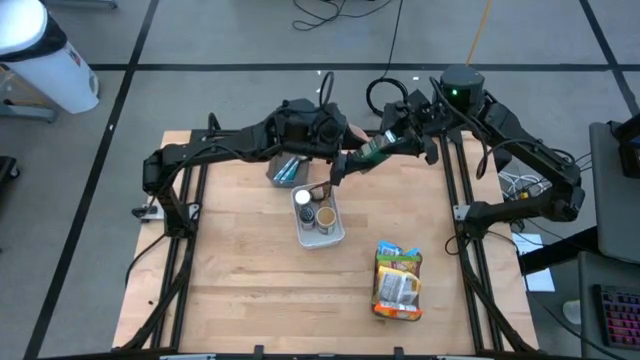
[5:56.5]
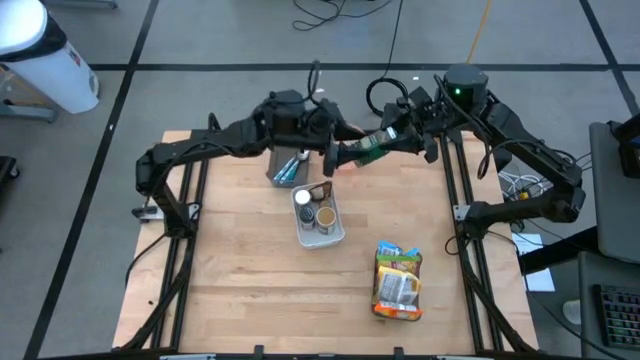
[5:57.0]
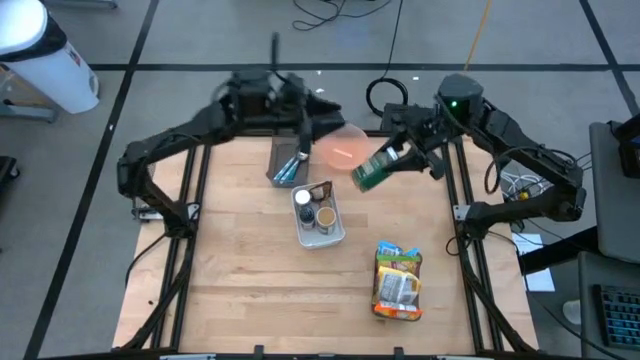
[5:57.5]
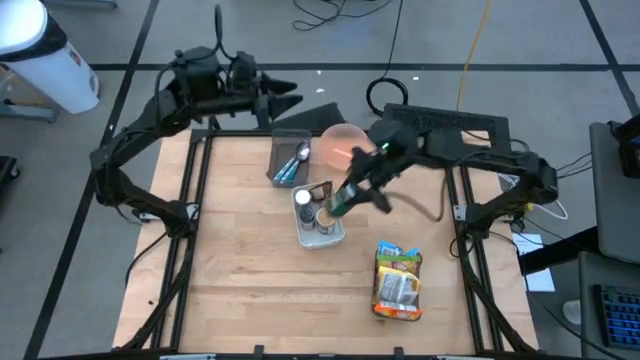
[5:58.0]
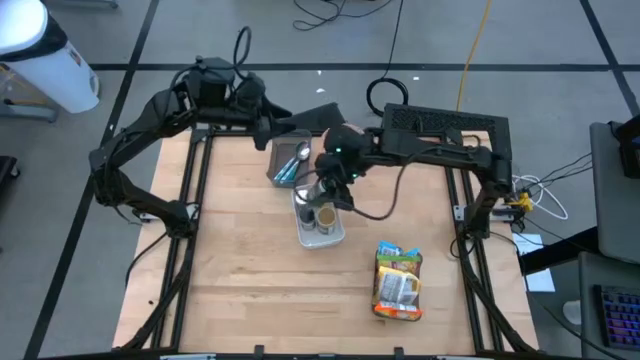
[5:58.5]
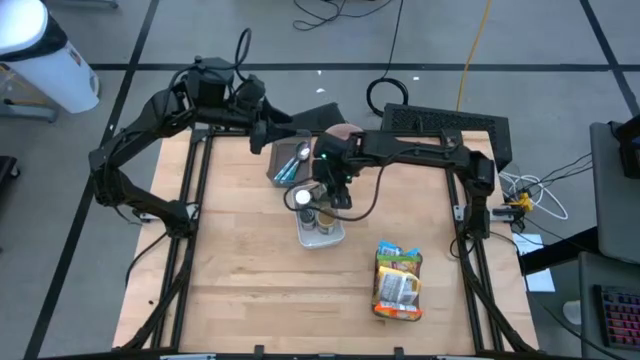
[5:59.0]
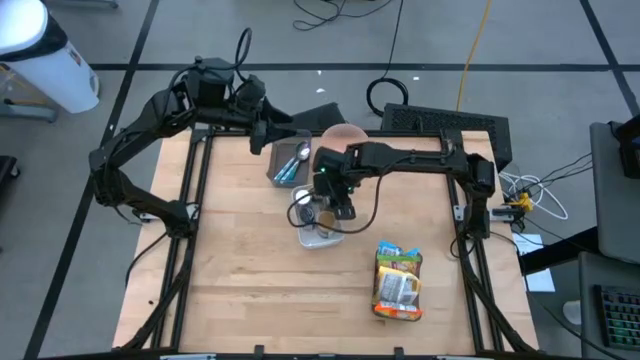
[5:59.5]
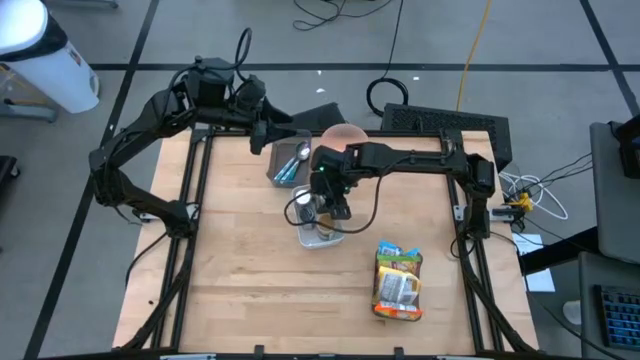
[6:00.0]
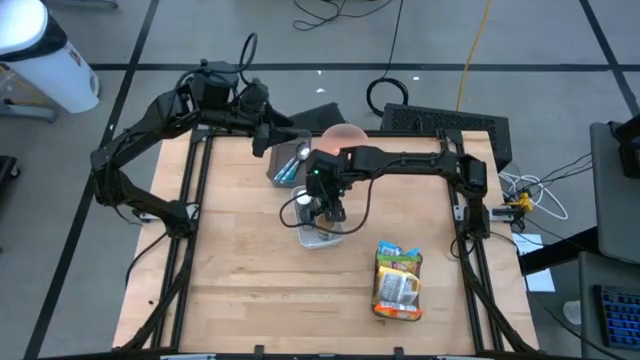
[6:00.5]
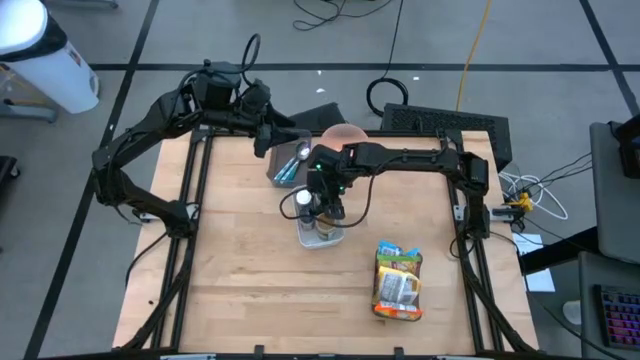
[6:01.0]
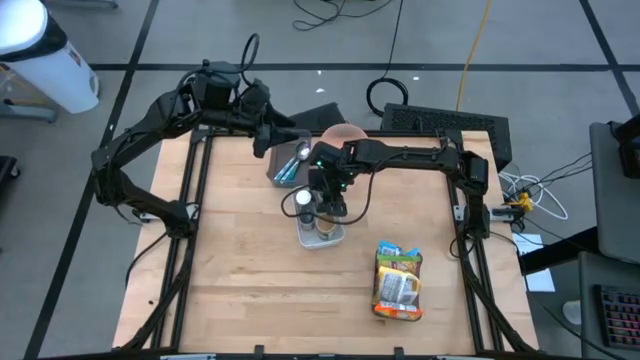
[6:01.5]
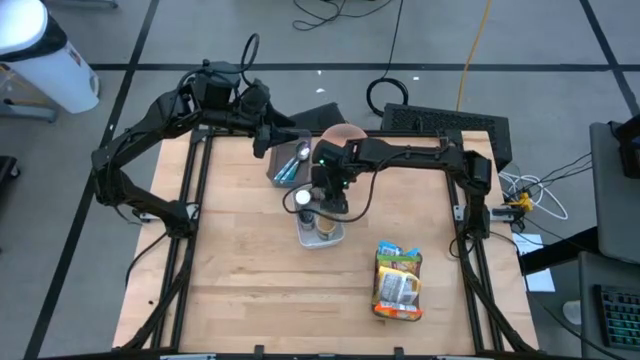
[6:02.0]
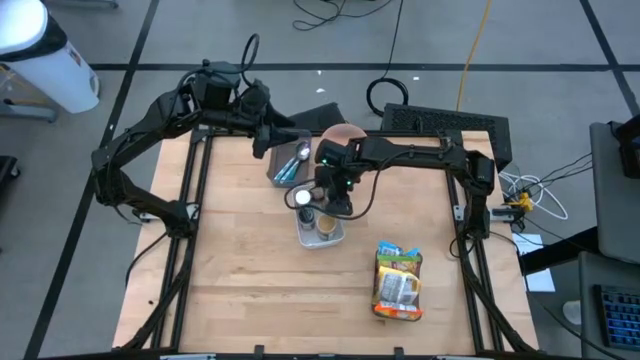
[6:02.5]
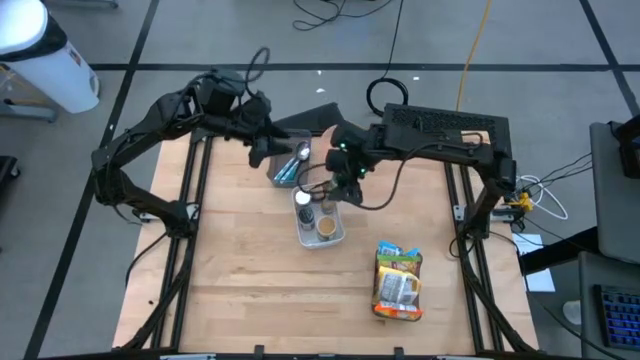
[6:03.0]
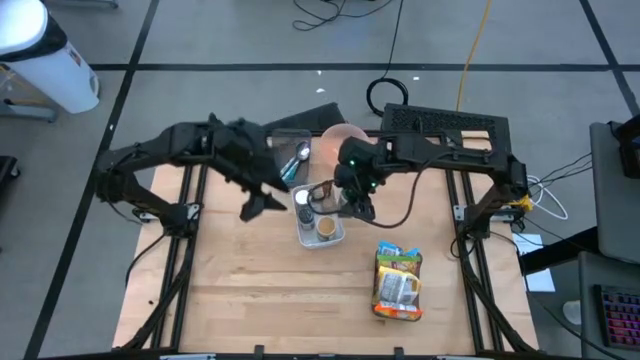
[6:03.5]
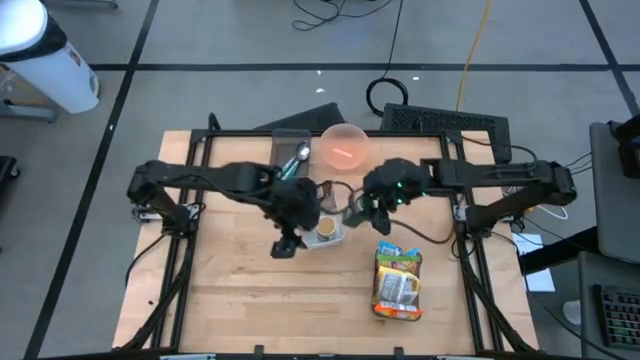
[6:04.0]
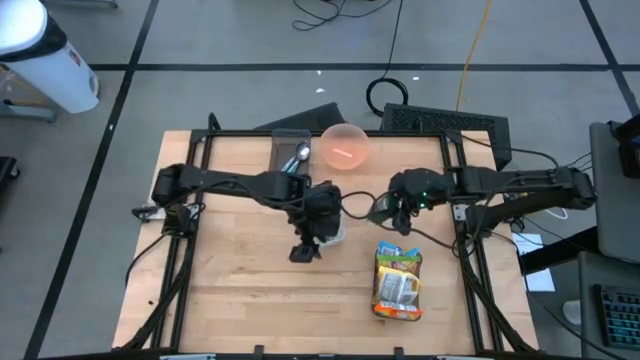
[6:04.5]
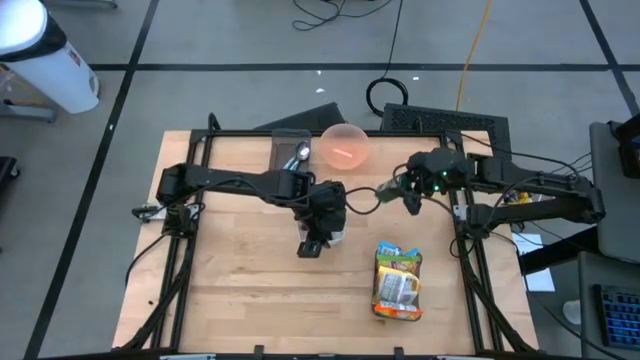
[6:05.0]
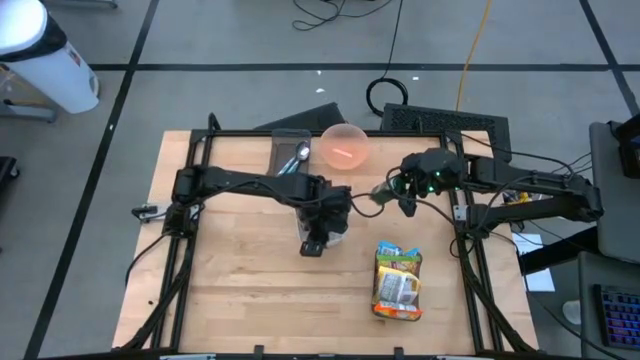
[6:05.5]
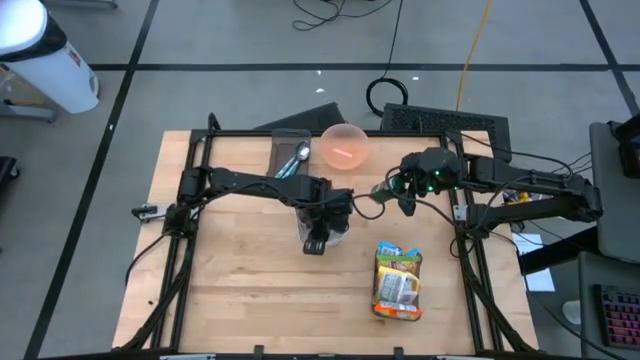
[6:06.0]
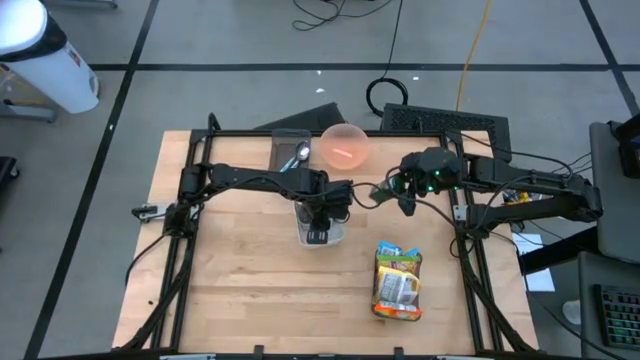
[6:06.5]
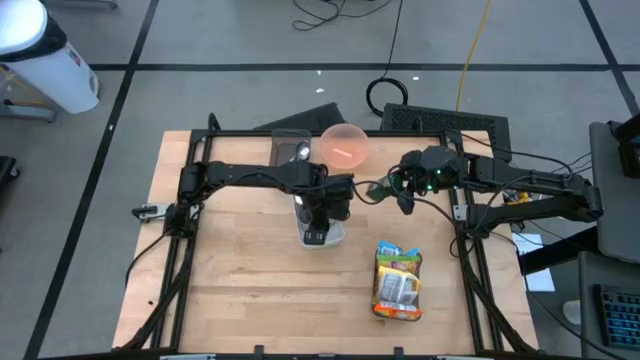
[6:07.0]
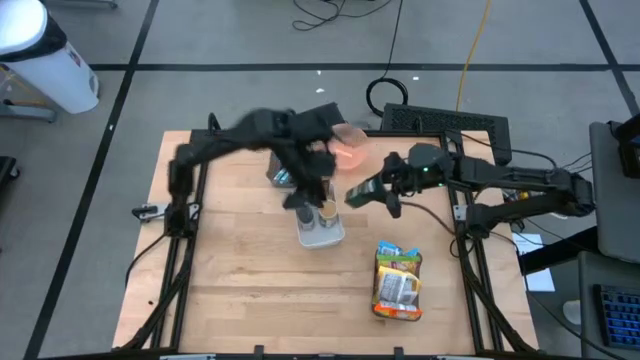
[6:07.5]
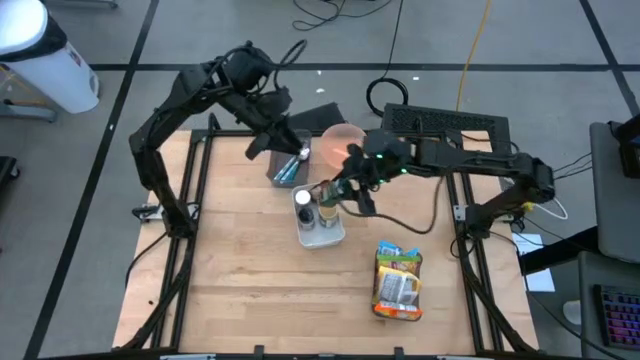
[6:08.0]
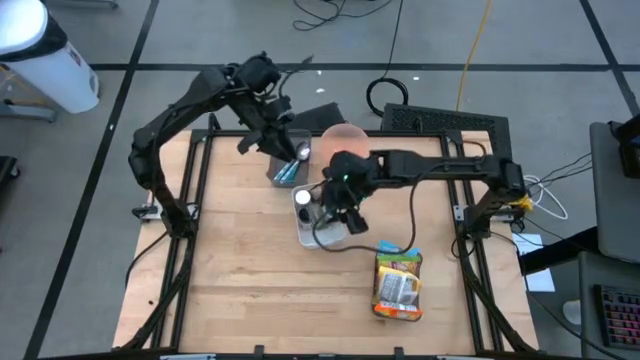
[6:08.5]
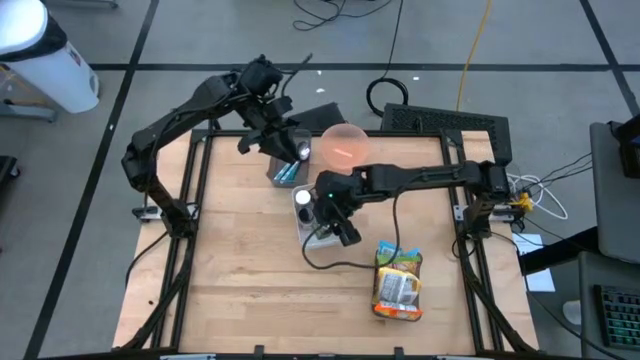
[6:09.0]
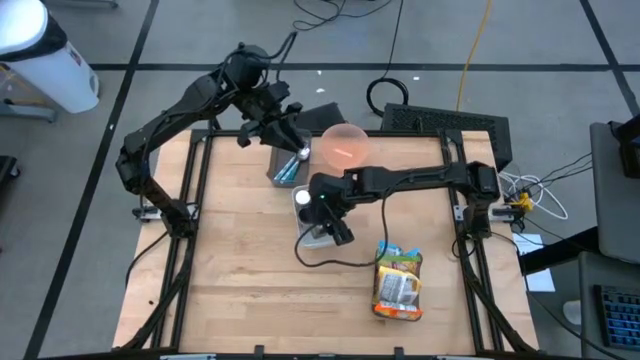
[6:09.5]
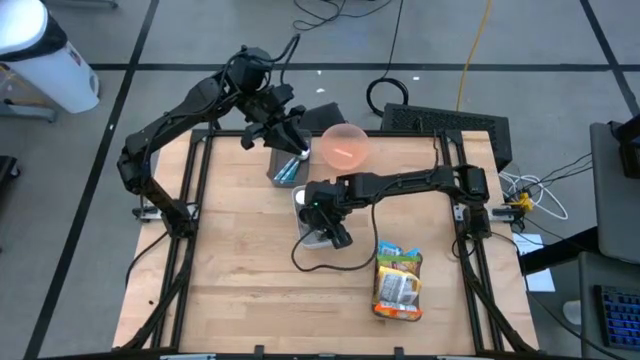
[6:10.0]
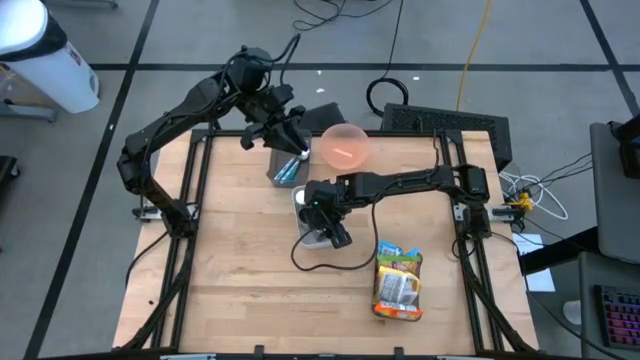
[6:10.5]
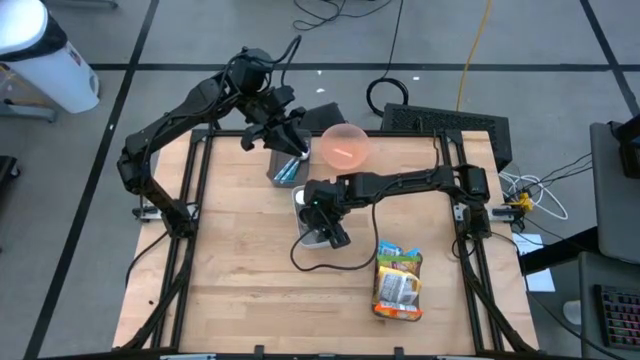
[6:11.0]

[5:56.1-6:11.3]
Task: Pick & Place Food Item
Put the green seasoning bottle into the white bin

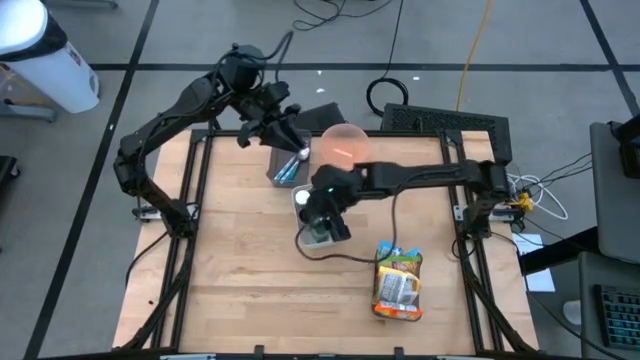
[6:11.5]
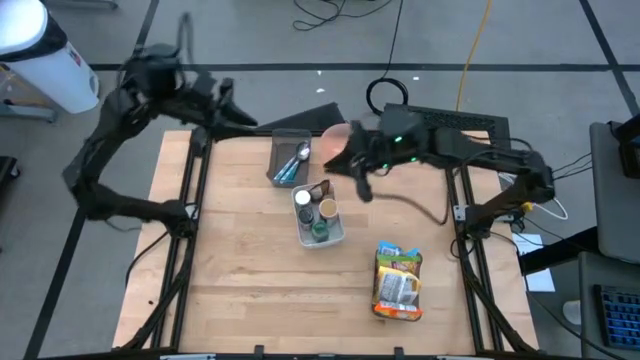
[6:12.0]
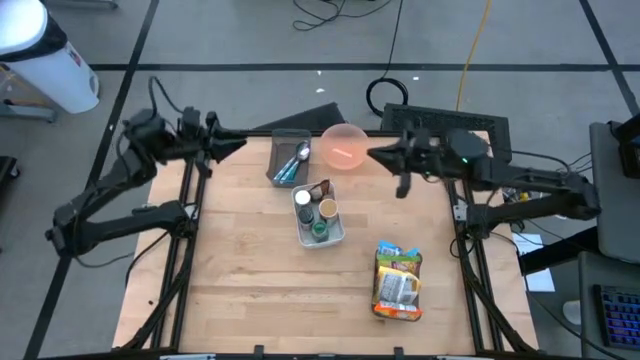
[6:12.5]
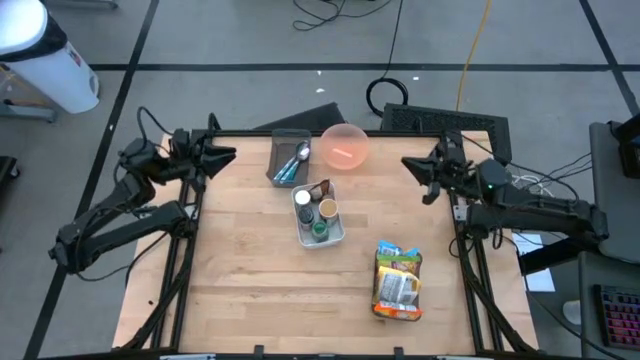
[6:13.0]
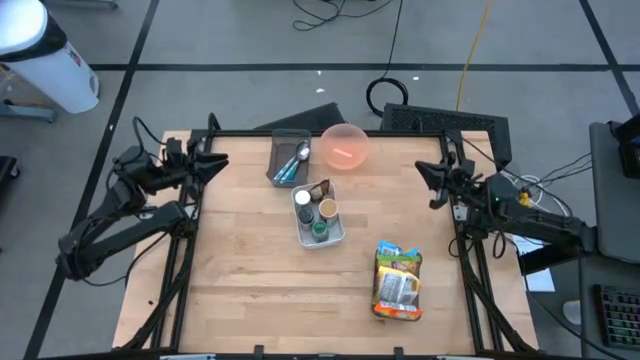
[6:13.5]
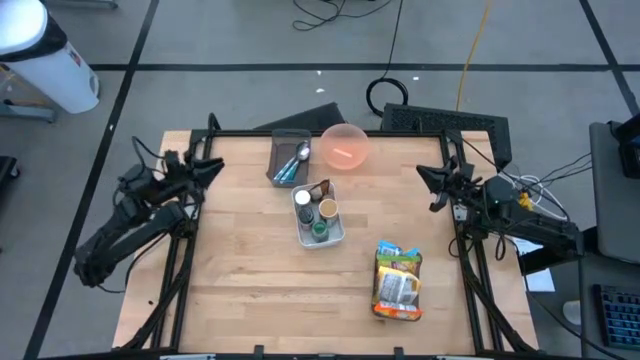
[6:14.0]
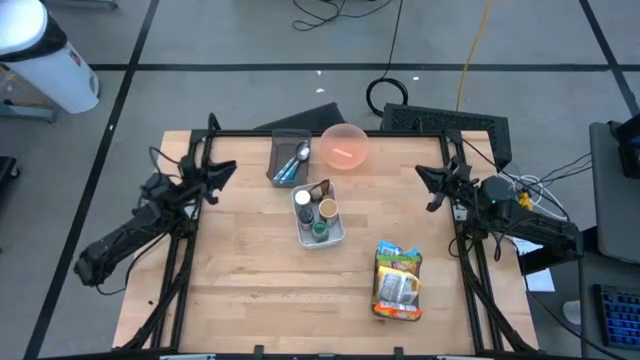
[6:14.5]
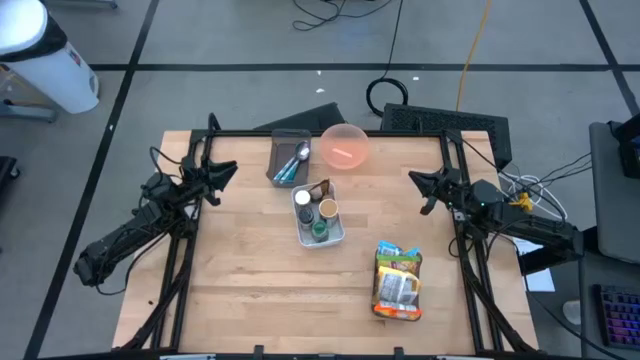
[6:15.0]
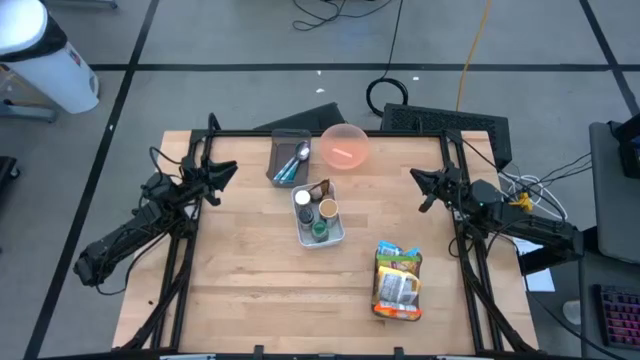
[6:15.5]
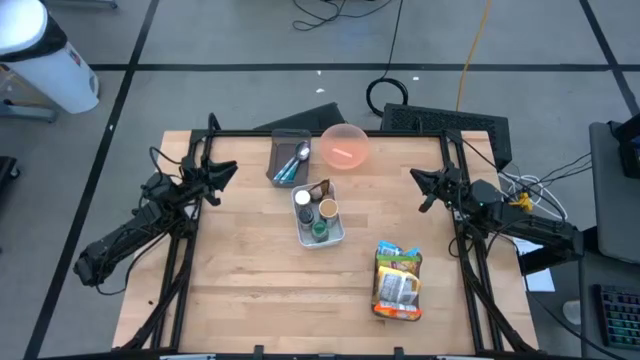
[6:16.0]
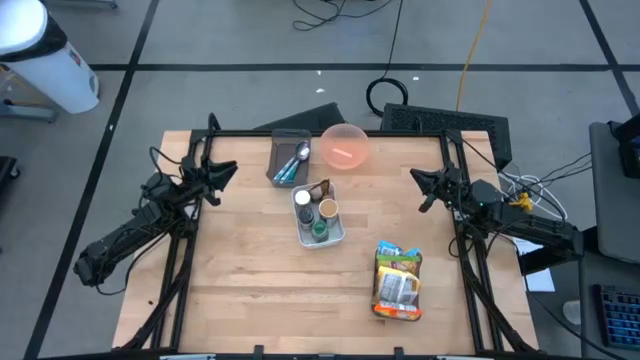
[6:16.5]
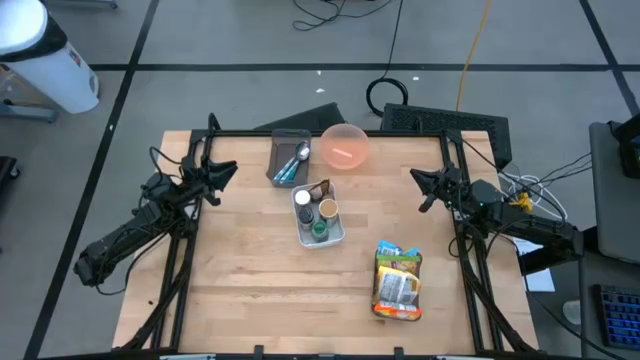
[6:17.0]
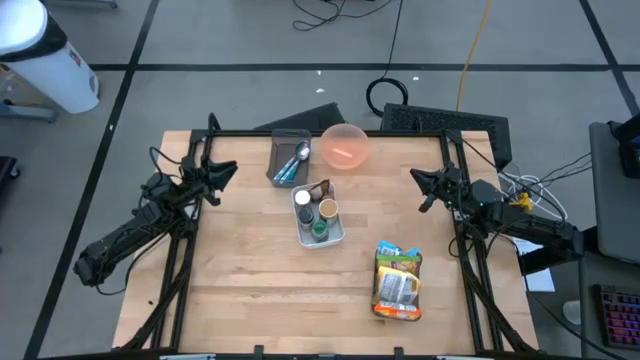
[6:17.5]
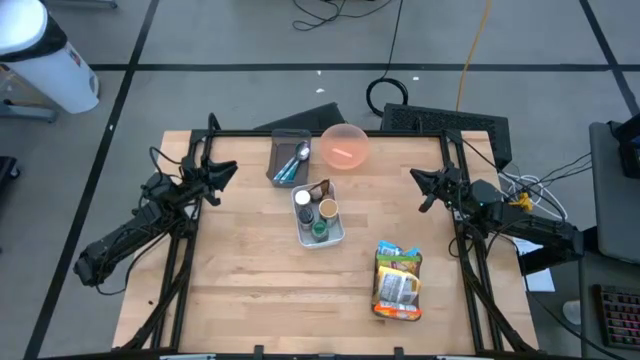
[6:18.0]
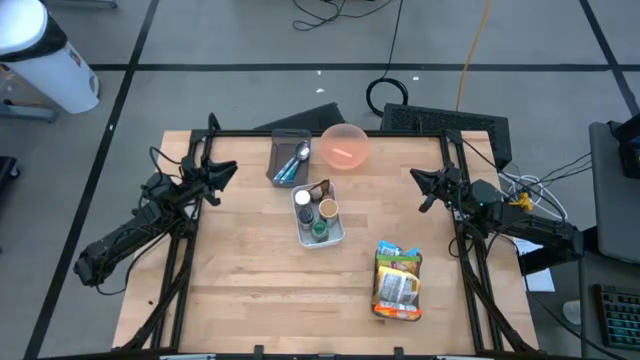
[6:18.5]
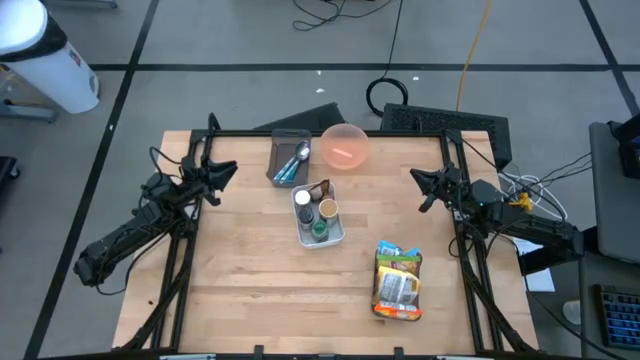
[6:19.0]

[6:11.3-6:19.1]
Return to Home Position
